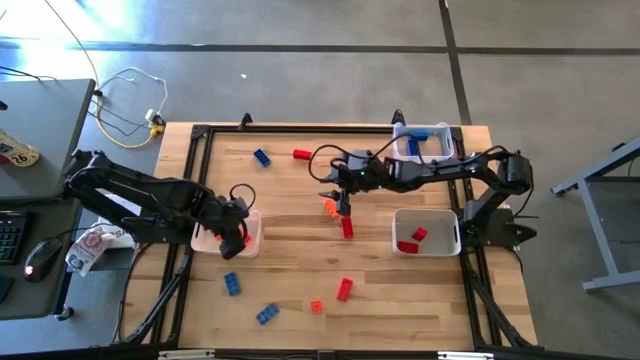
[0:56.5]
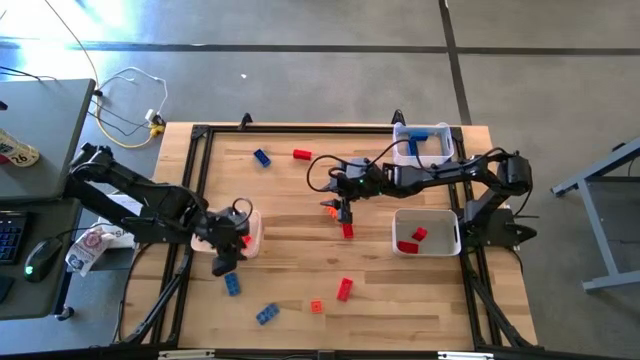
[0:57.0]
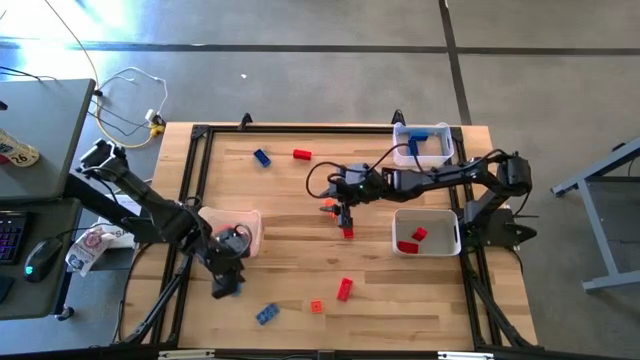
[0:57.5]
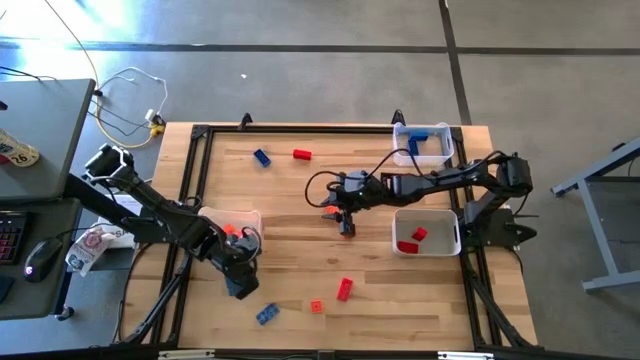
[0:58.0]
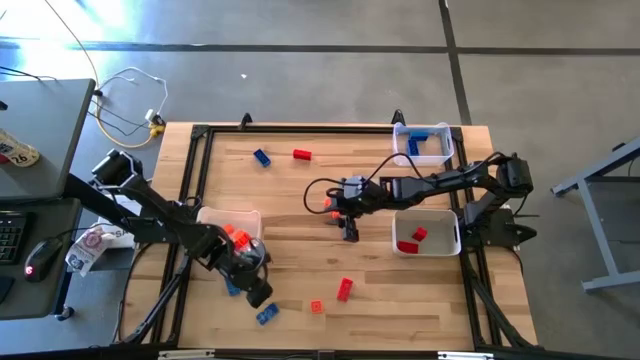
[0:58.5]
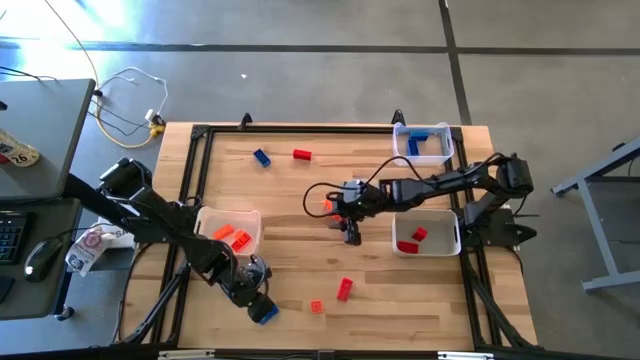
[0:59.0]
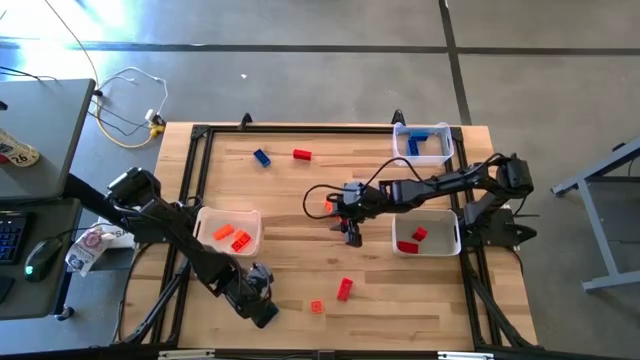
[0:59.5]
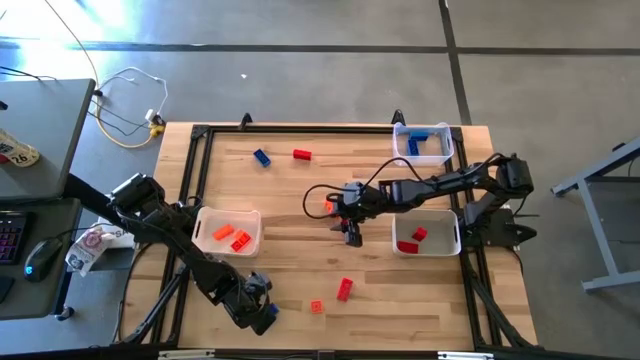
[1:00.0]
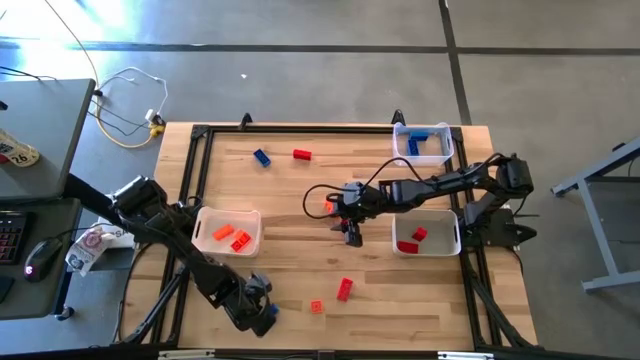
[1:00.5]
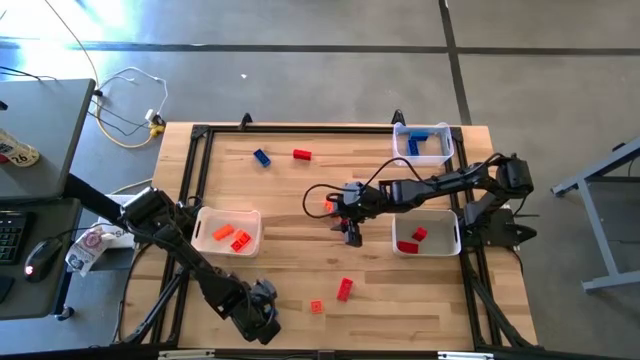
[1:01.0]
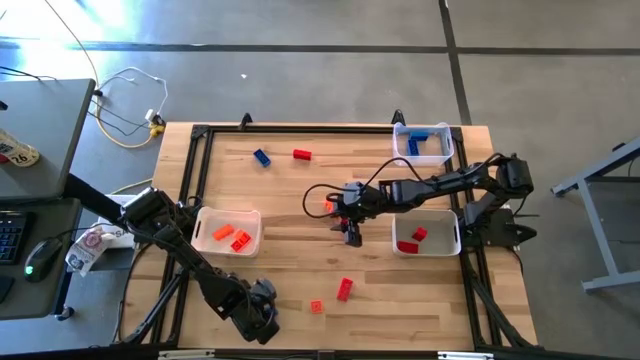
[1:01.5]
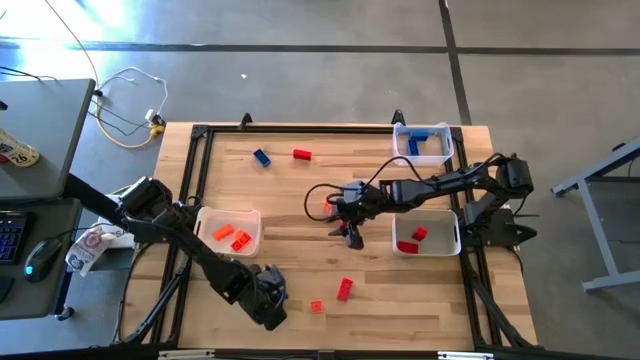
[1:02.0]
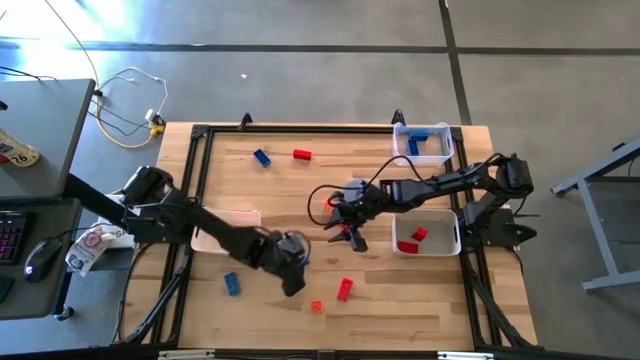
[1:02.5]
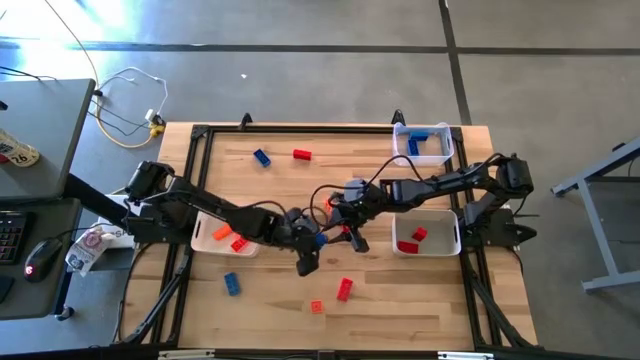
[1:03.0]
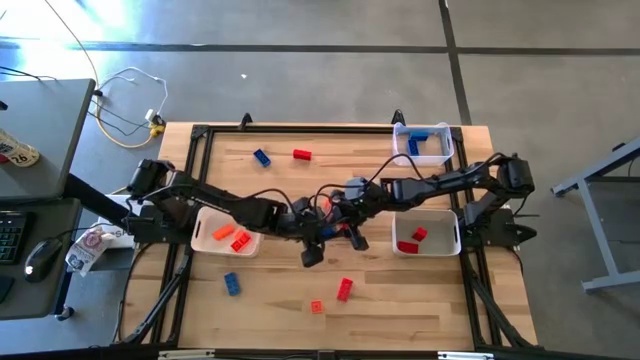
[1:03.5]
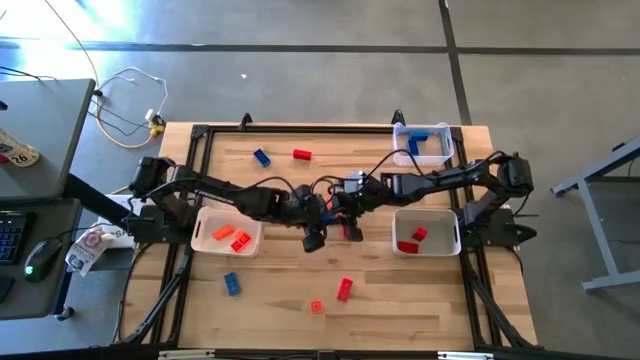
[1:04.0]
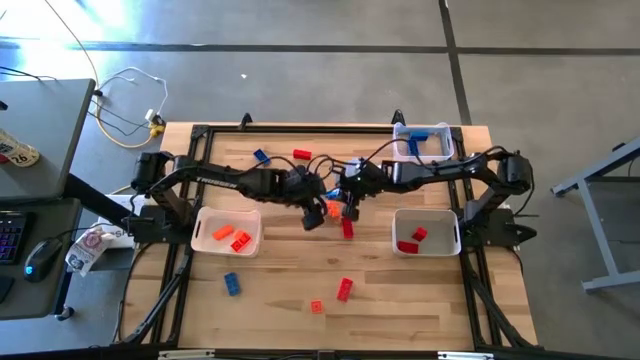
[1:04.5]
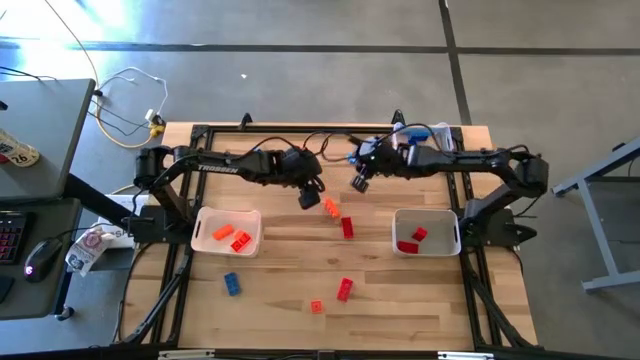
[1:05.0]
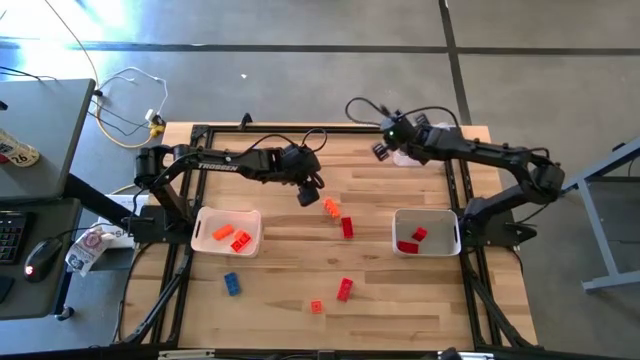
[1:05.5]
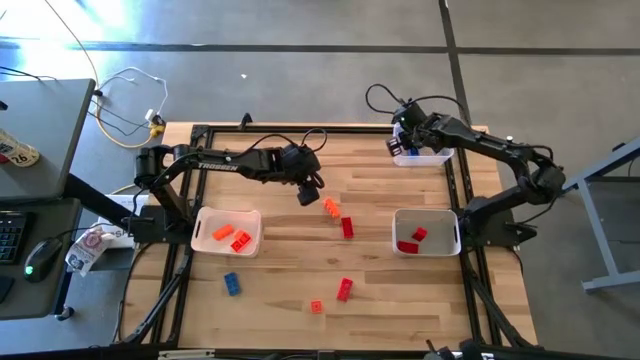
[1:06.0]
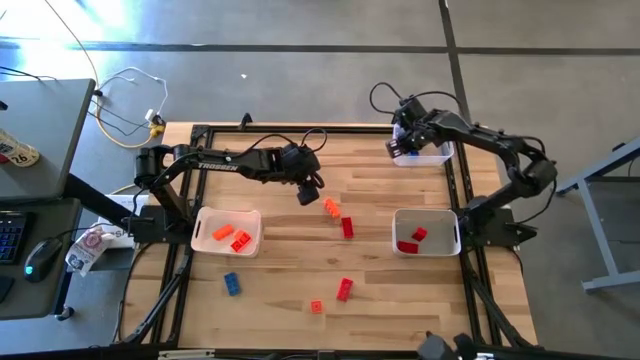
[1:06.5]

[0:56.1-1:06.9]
Task: Sort & place blocks by color
Put the blue game piece into the transparent bin

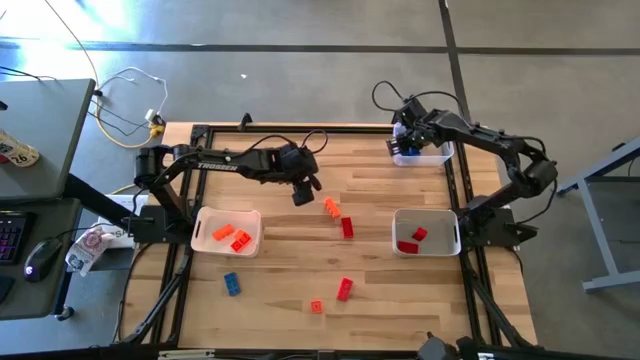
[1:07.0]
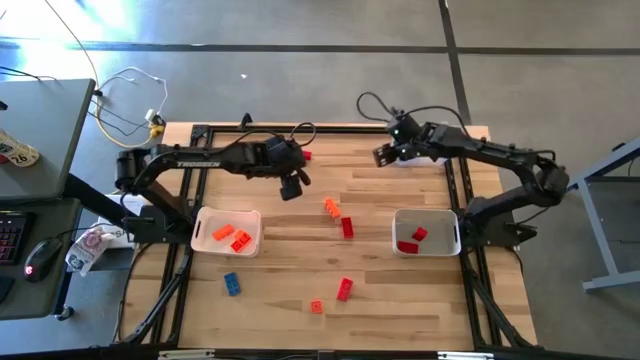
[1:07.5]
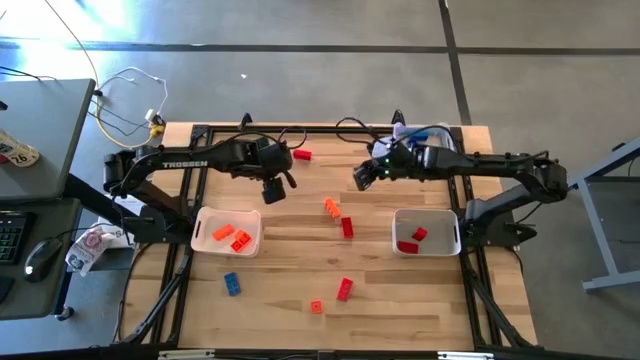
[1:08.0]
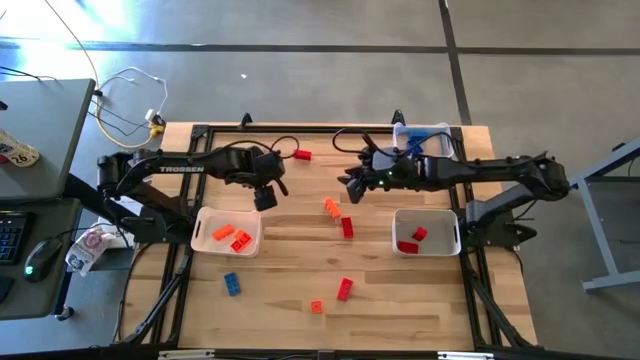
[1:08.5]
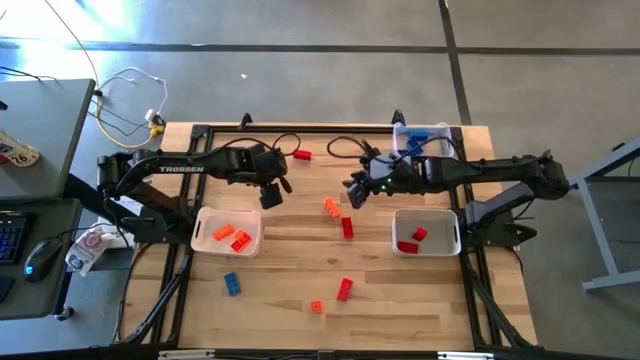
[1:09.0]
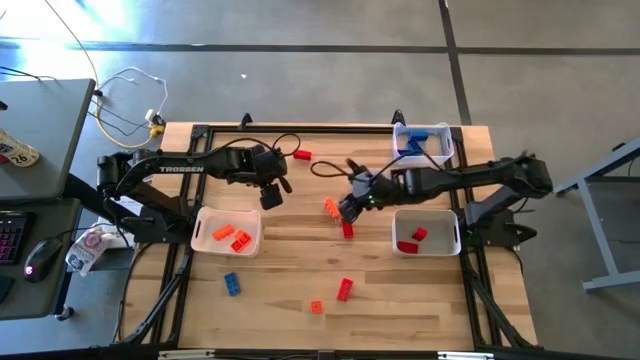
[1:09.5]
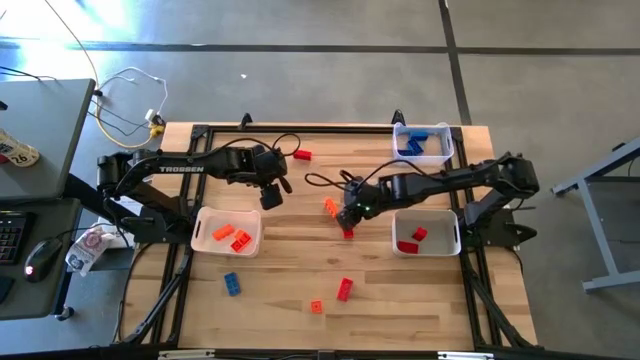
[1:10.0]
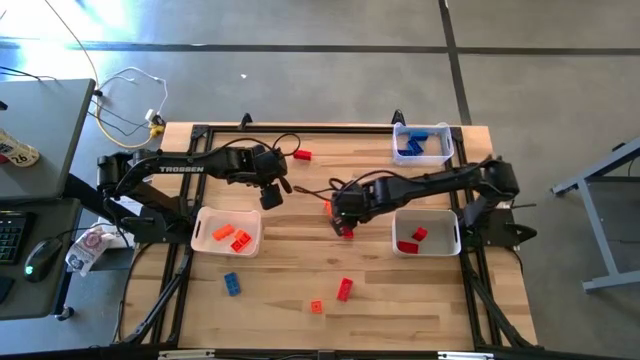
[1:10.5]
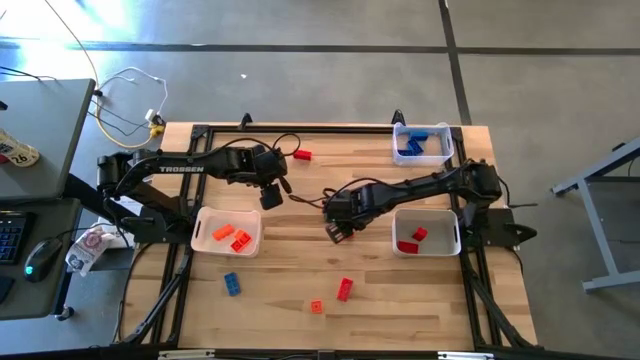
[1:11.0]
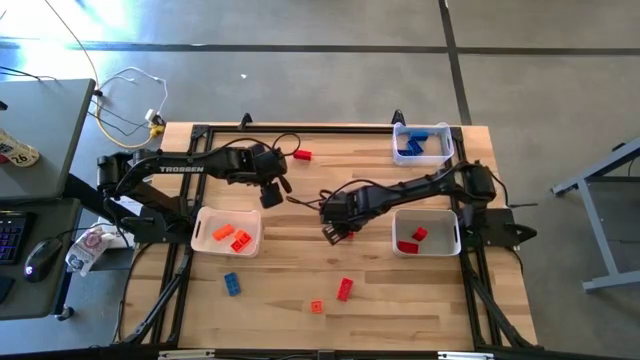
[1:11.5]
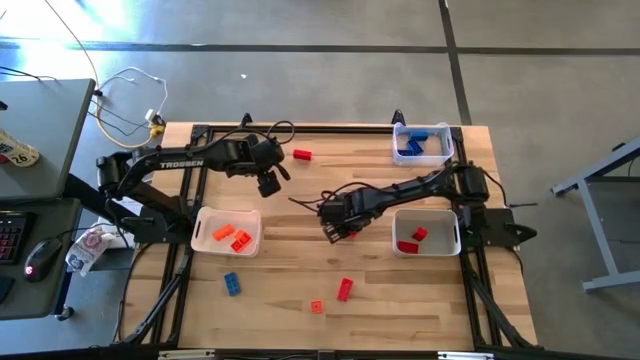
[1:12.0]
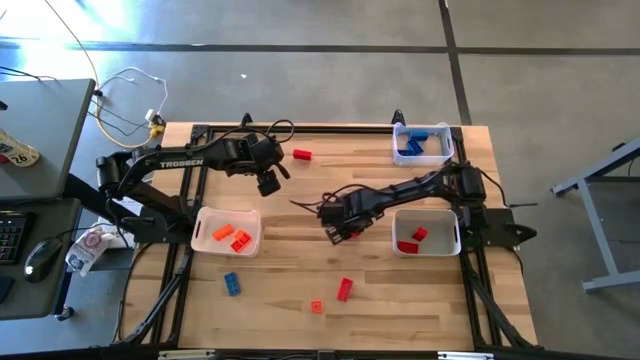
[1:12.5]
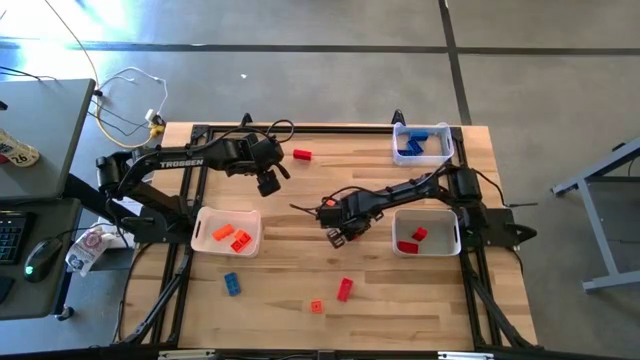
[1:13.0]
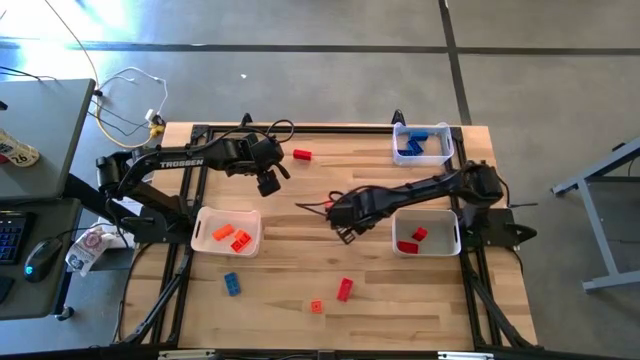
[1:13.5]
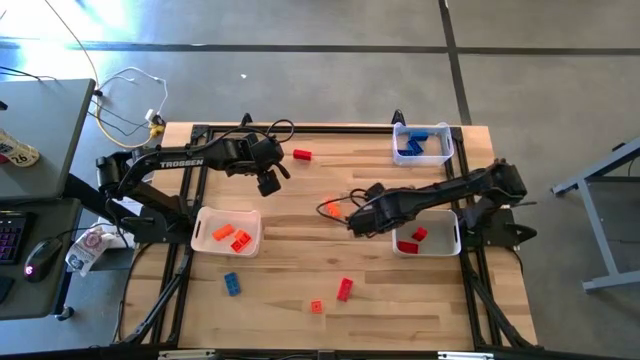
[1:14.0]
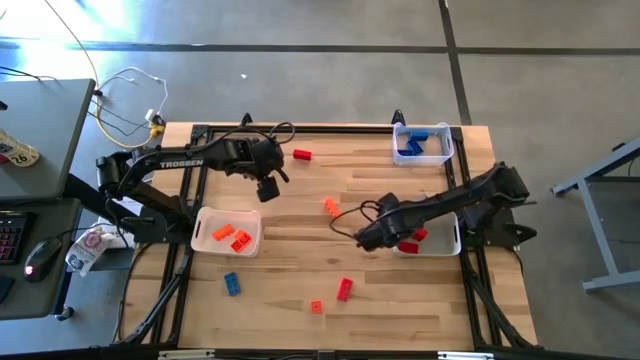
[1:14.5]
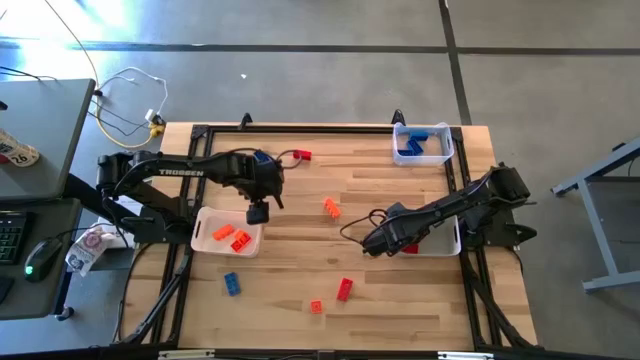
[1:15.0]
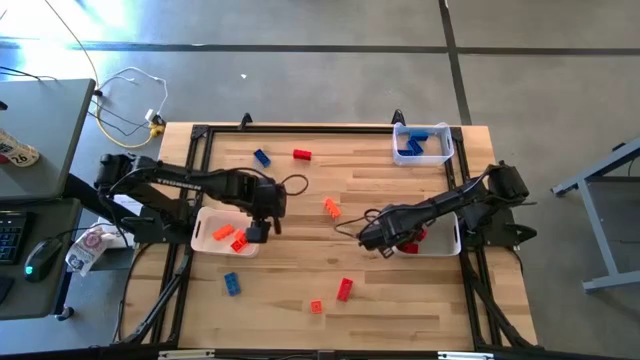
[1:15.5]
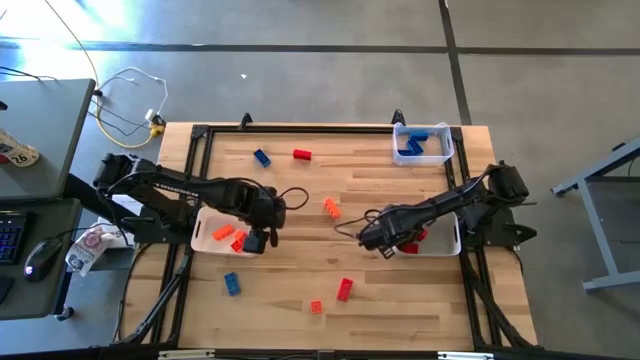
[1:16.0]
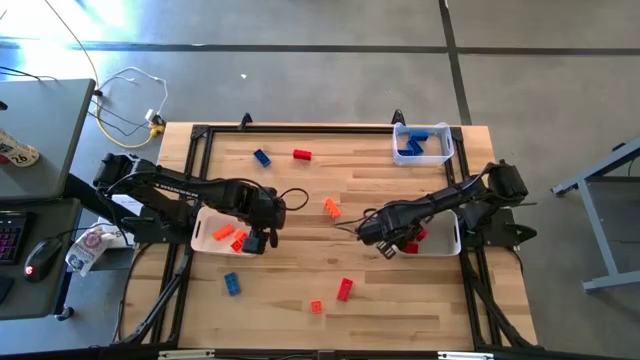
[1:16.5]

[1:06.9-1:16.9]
Put the red game piece into the gray bin

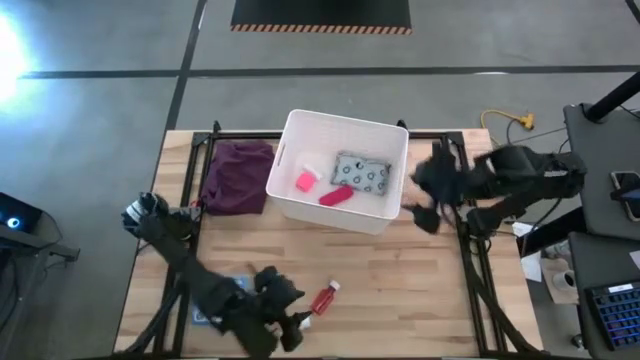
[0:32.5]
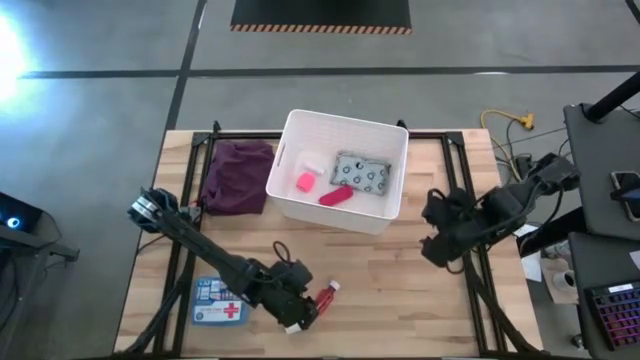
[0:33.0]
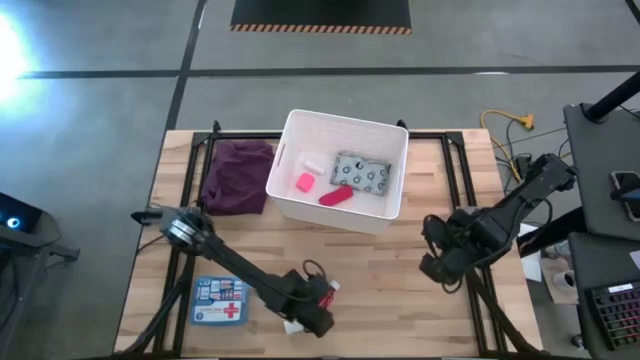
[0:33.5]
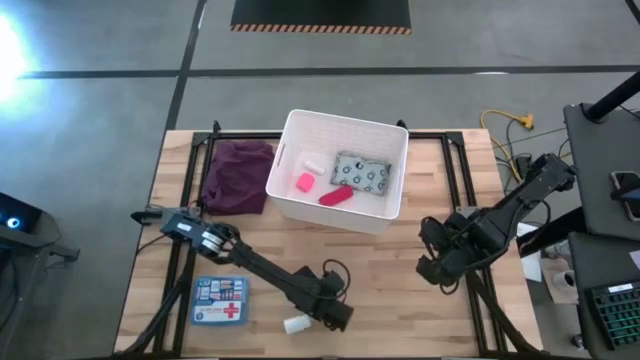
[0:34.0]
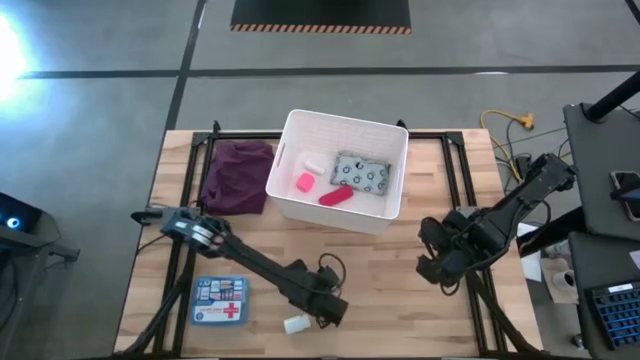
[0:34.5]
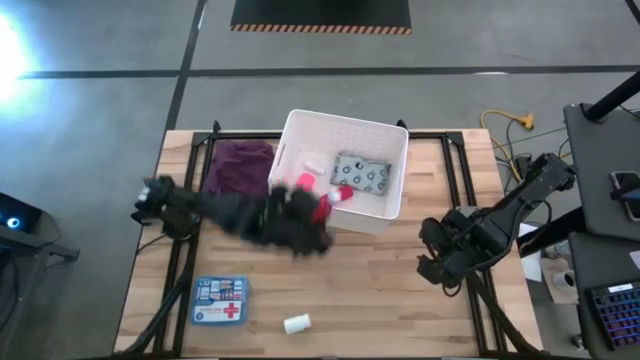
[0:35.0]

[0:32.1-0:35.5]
Task: Pick & place medical supplies in basket/bin
Put the brown medicine bottle into the white bin
